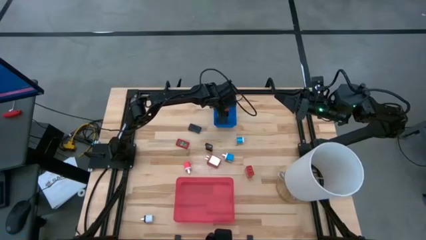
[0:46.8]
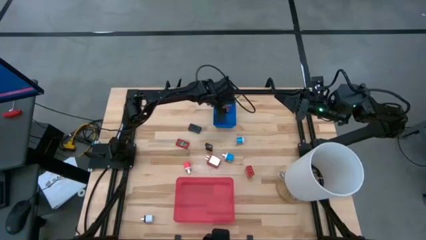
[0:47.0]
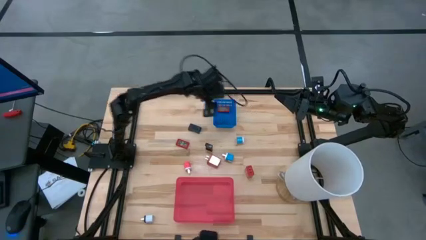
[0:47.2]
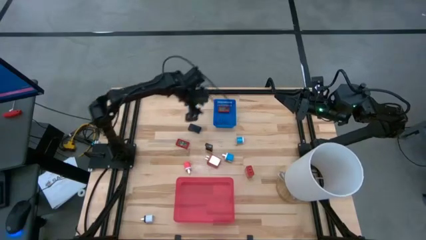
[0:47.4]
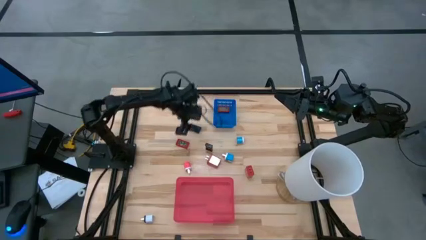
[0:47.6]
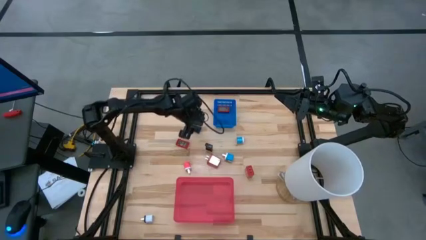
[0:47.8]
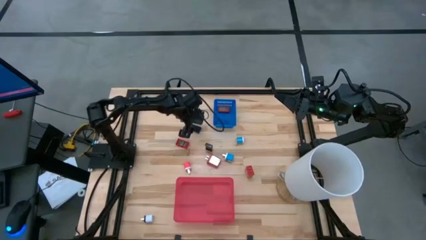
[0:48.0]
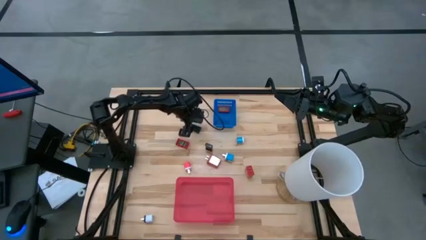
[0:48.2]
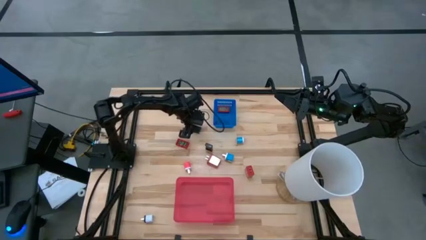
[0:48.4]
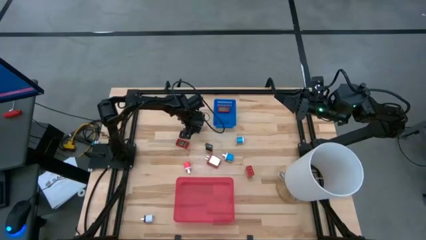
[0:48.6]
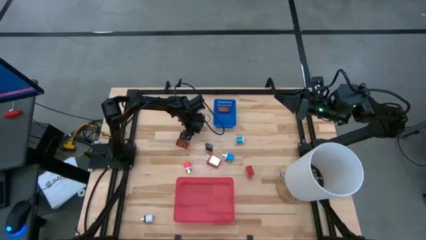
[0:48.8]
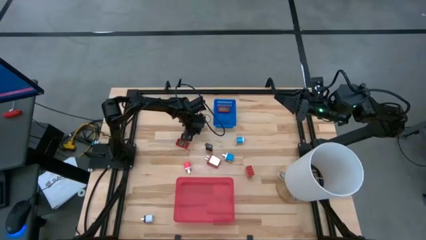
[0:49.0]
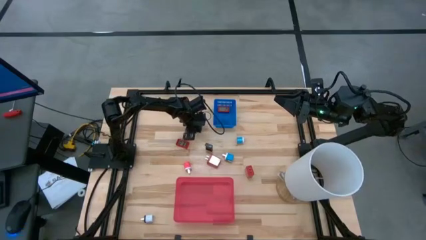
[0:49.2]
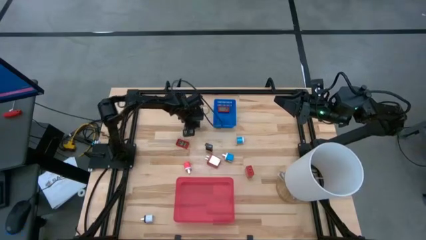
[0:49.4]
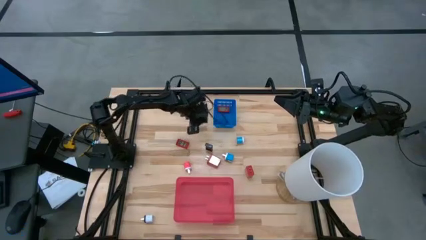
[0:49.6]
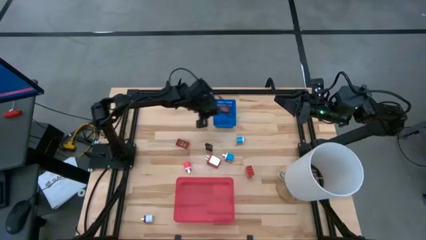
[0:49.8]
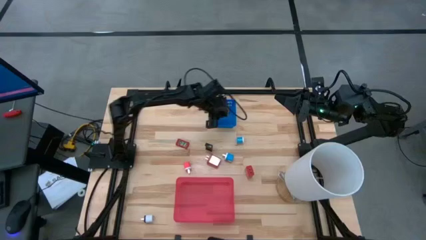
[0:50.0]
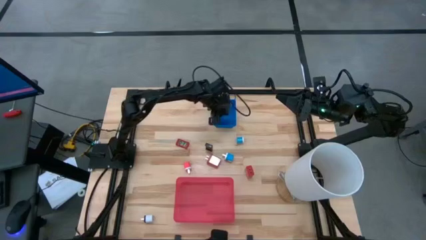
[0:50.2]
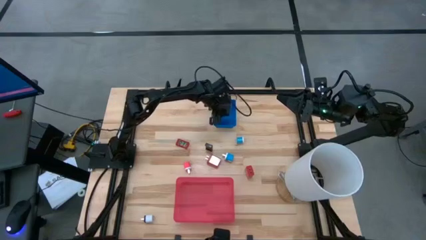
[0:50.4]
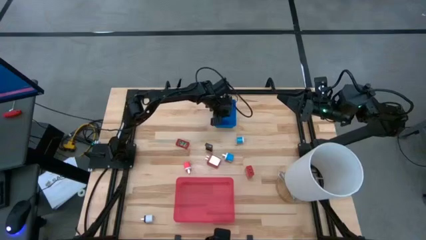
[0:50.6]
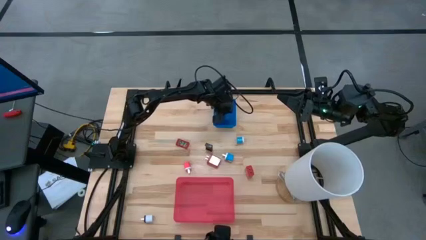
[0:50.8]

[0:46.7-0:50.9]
Task: Pick & Place Office items
Put the top black digital clock into the blue bin

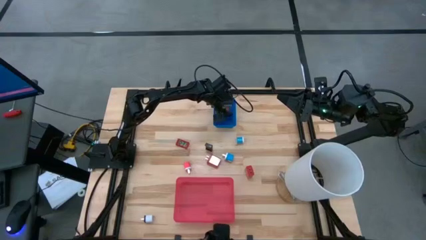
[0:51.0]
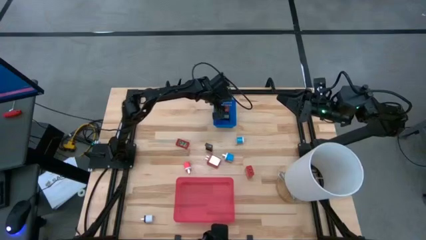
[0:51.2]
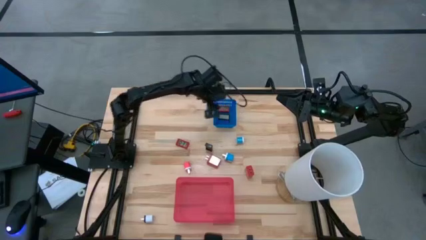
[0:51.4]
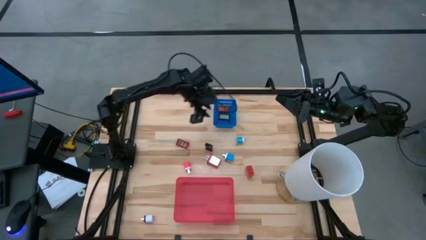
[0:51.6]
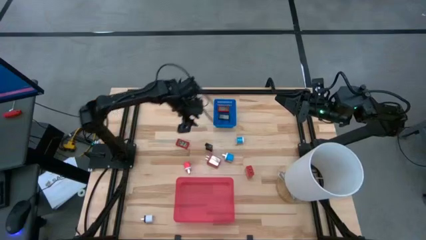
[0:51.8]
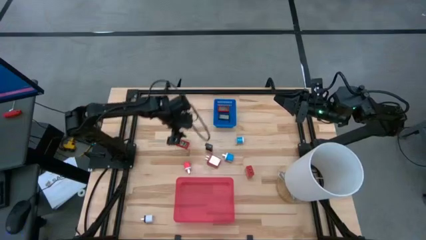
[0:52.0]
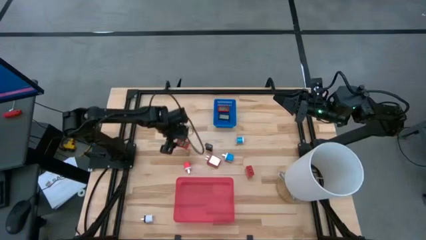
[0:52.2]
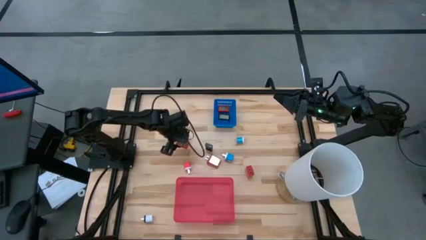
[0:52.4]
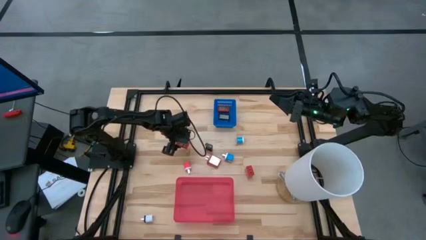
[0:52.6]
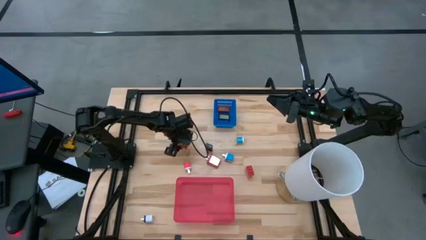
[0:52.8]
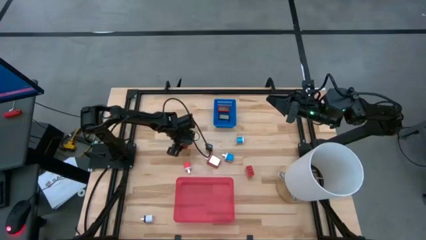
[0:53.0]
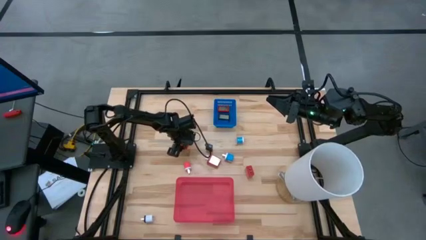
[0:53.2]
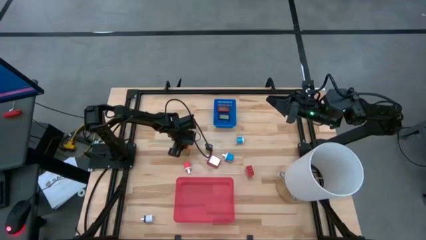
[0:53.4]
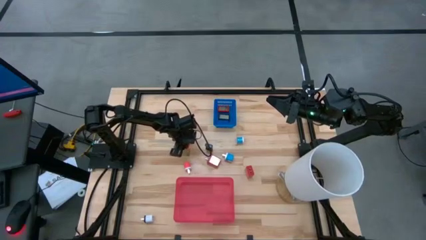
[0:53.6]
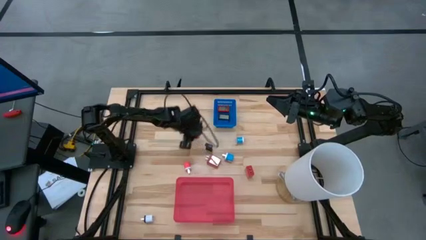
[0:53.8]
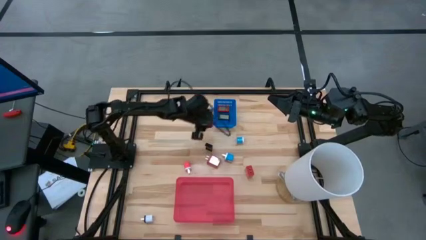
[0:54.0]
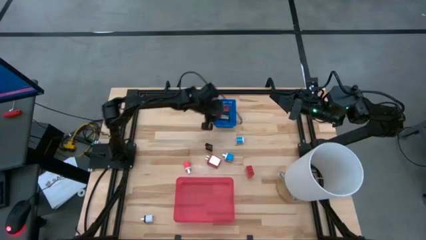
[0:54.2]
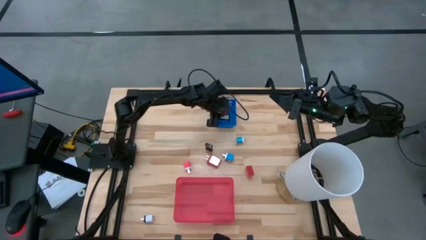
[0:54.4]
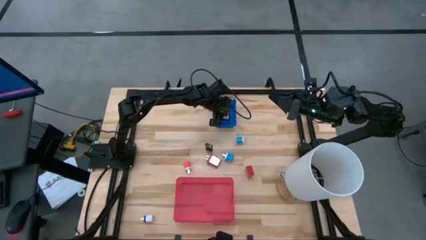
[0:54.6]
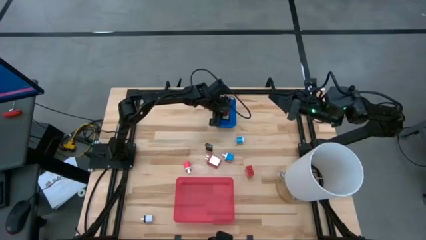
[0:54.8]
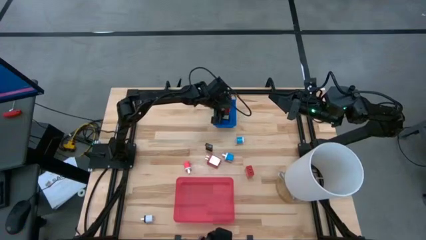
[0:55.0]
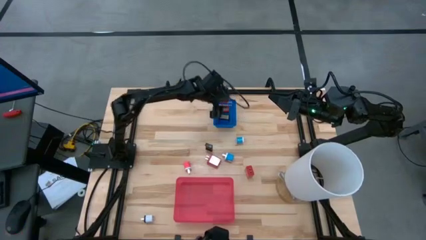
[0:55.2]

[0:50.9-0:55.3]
Put the red digital clock into the blue bin

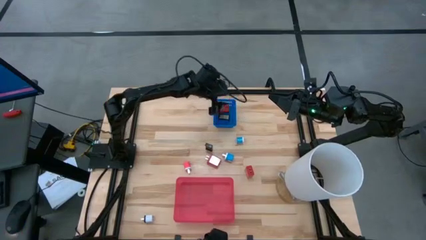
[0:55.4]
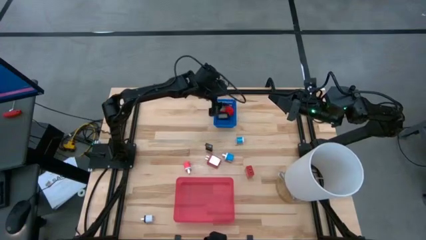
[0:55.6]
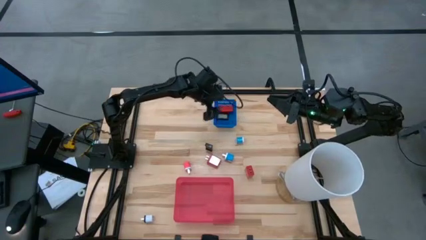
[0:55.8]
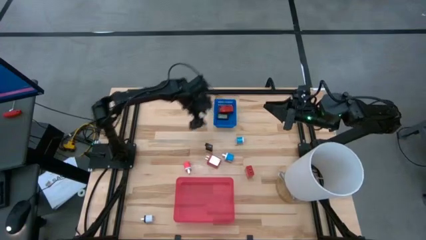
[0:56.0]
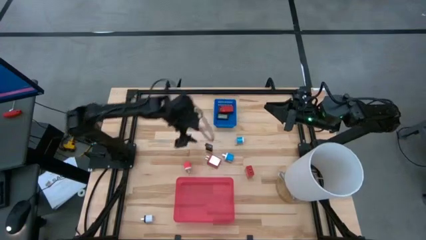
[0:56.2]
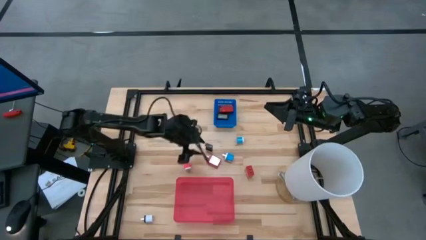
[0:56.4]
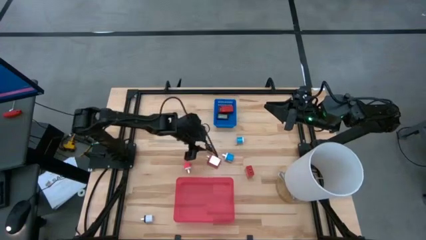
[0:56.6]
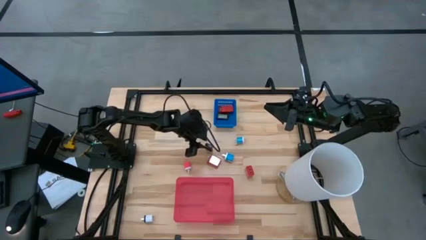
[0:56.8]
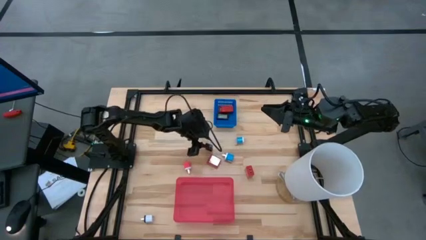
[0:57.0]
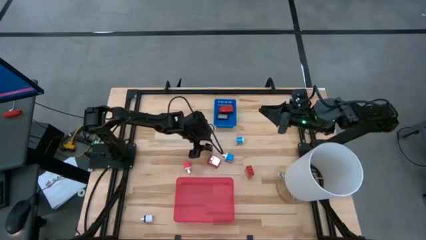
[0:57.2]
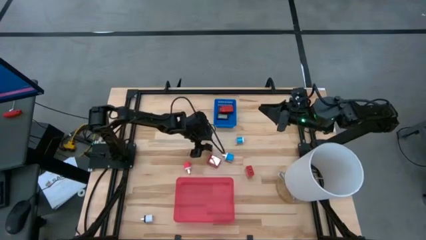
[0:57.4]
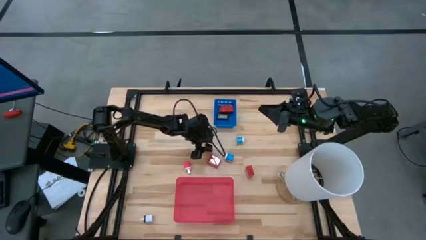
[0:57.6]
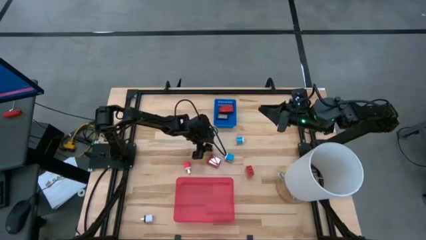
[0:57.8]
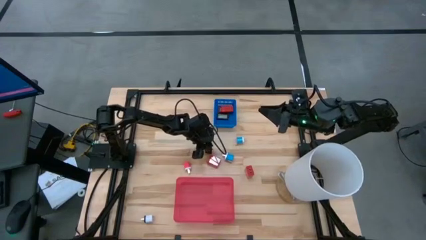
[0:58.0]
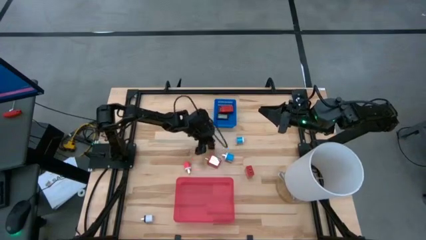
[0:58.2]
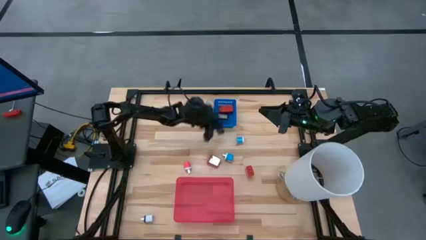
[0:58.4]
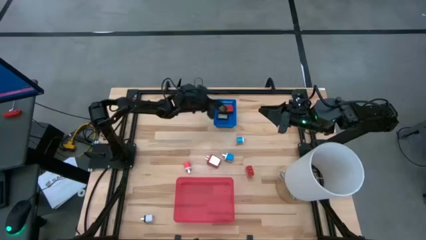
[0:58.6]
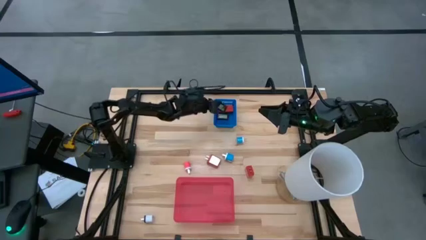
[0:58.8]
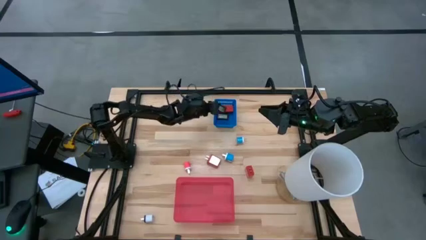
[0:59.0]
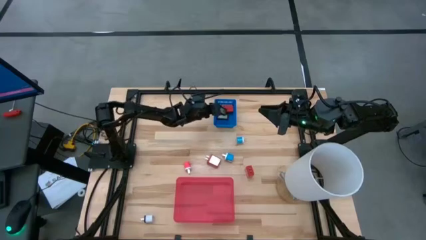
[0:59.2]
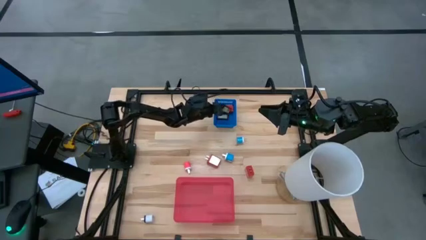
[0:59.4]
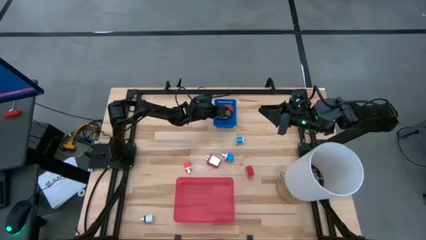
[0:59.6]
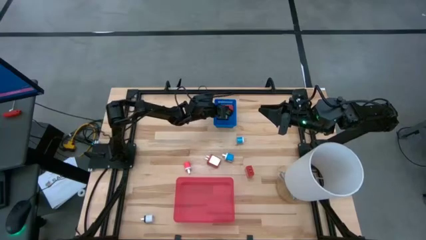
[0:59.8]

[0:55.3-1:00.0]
Put the black digital clock into the blue bin

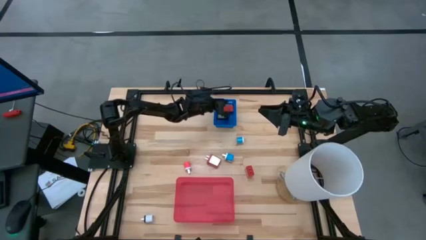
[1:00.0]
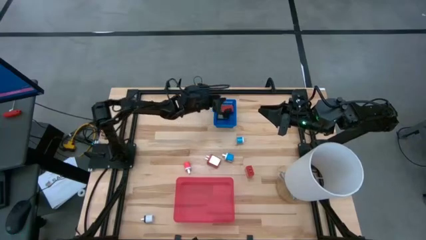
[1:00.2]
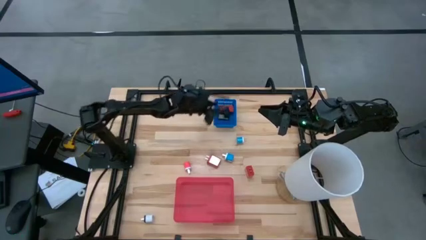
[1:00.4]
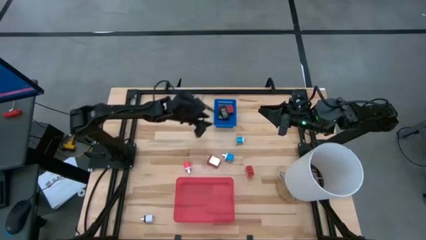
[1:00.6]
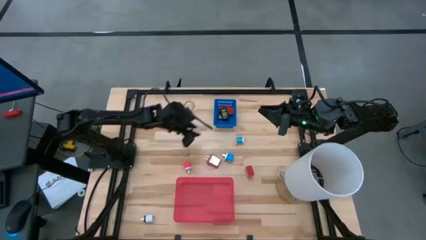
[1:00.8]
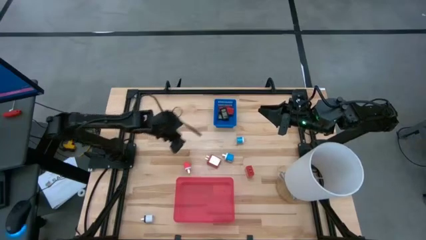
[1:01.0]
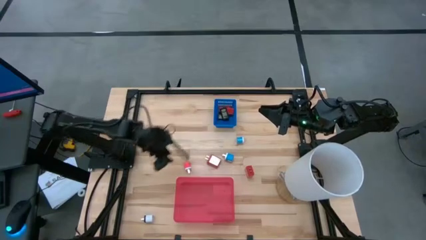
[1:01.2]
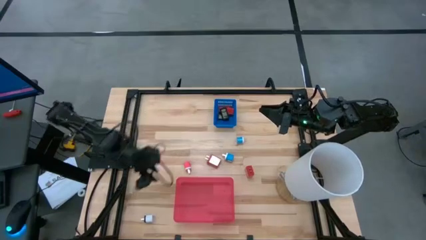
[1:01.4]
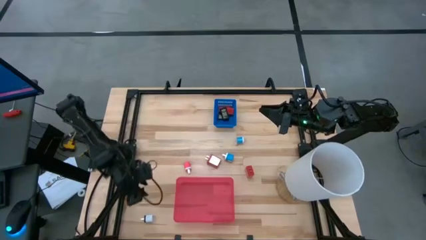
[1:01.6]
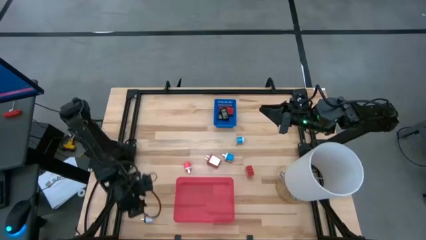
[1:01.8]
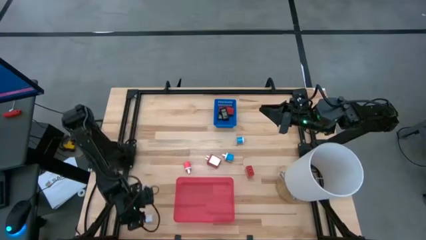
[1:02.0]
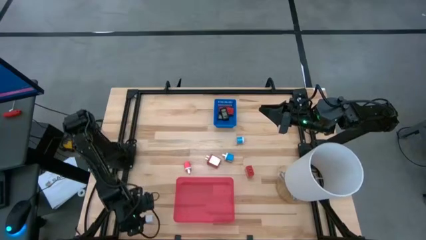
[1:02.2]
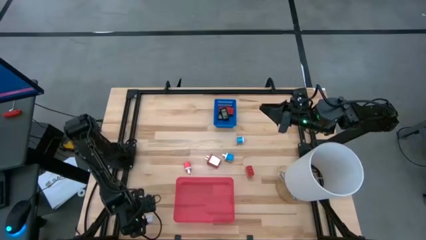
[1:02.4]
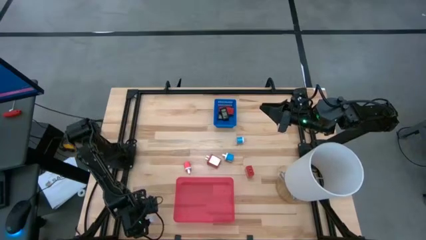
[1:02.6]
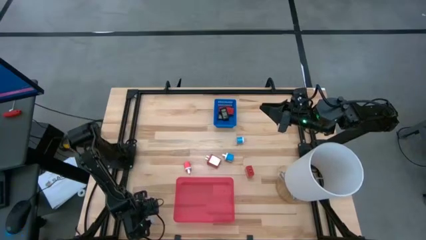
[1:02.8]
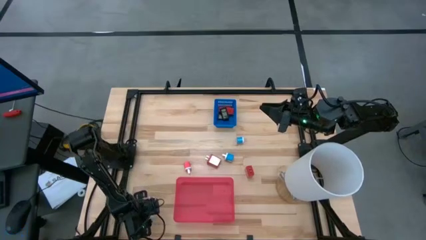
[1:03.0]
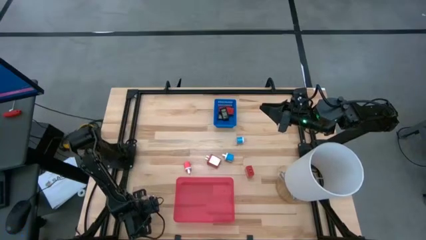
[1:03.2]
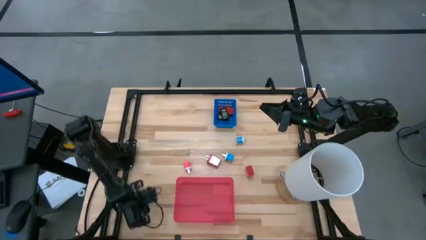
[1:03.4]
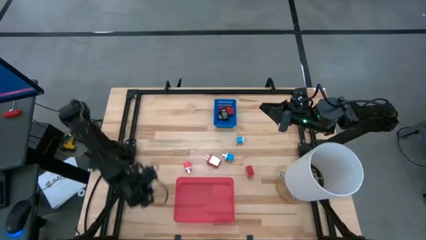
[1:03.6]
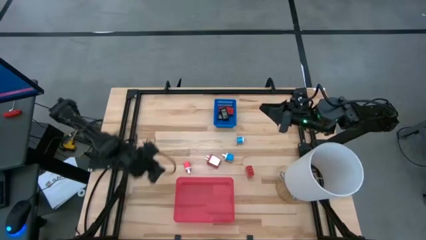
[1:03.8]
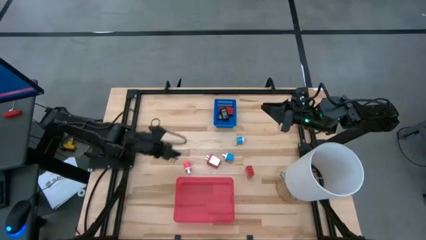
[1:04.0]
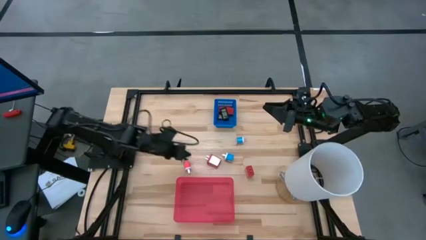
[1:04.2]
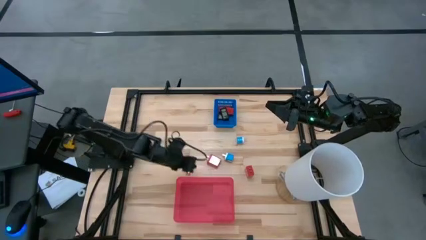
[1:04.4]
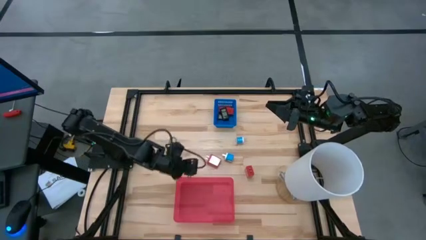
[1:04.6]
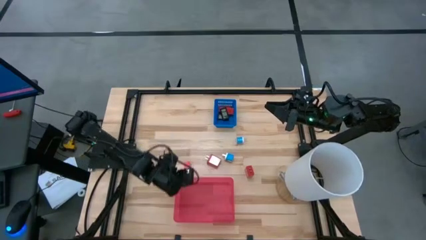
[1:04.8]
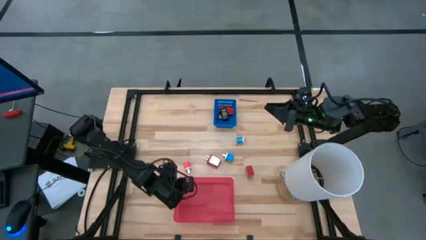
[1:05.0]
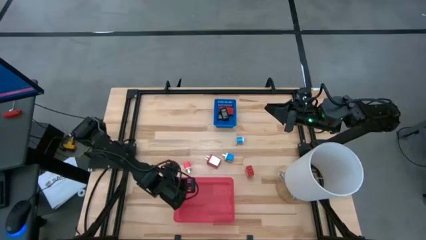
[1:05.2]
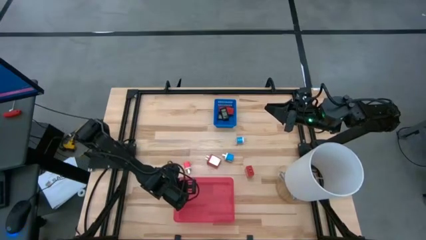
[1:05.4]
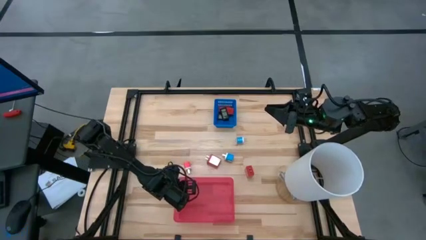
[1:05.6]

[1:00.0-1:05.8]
Put the white charger adapter into the red bin
